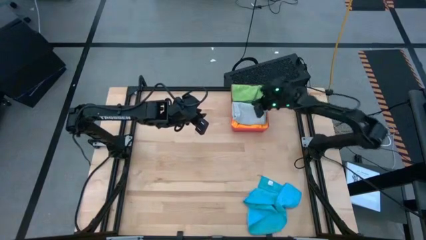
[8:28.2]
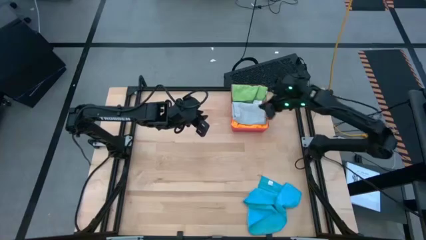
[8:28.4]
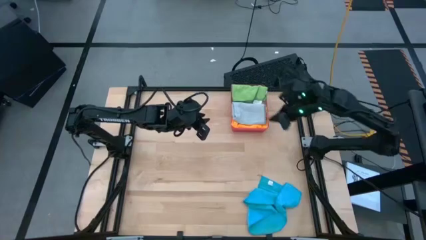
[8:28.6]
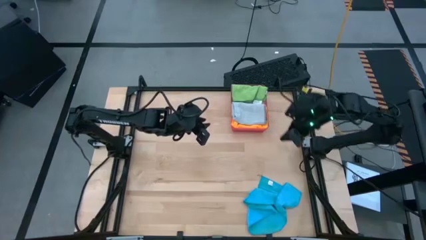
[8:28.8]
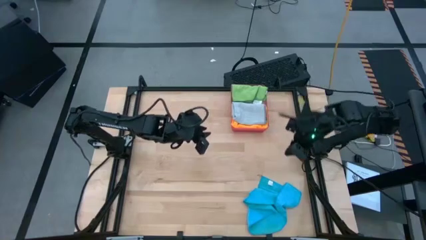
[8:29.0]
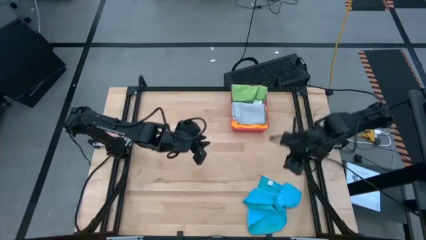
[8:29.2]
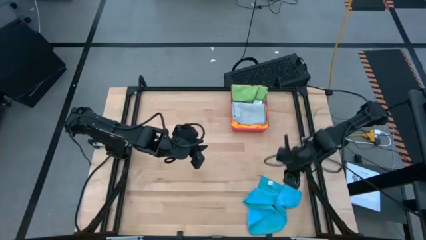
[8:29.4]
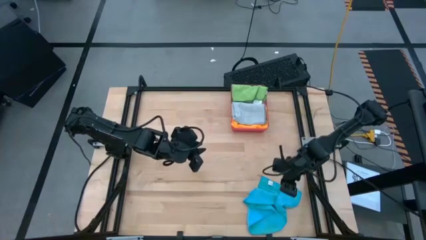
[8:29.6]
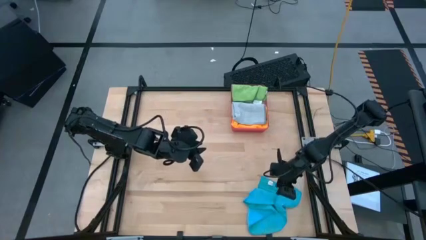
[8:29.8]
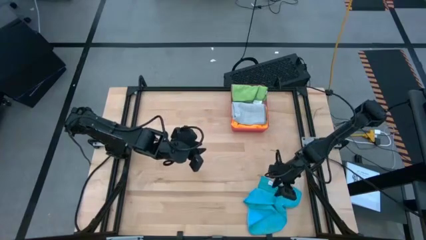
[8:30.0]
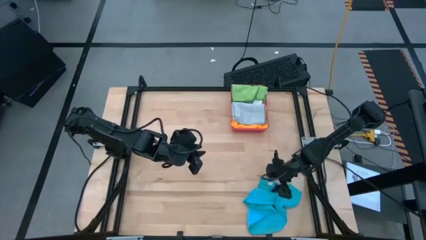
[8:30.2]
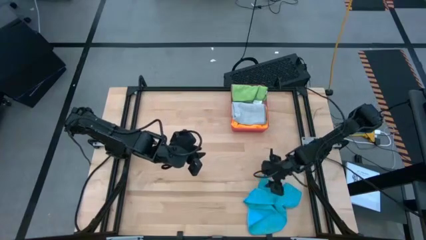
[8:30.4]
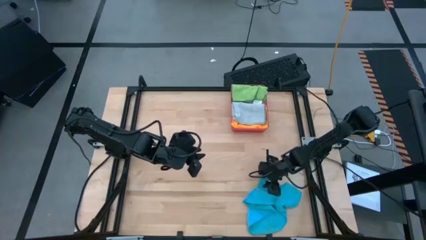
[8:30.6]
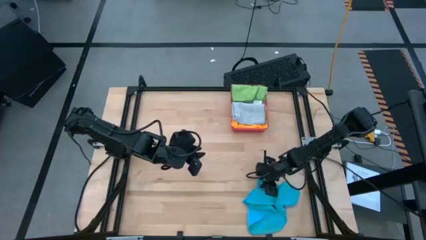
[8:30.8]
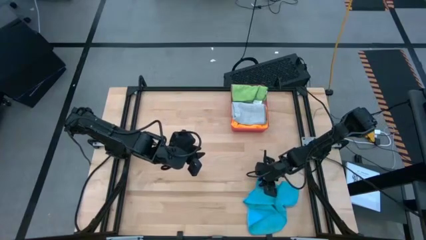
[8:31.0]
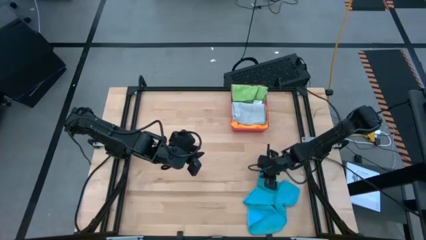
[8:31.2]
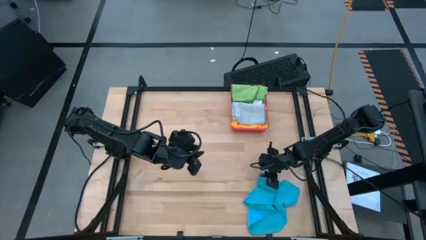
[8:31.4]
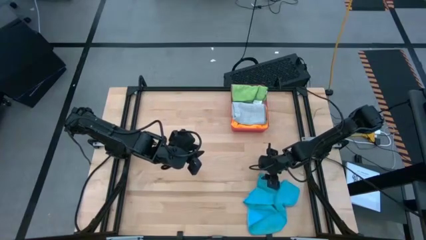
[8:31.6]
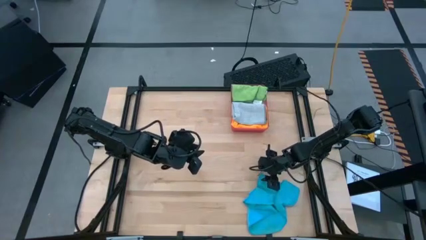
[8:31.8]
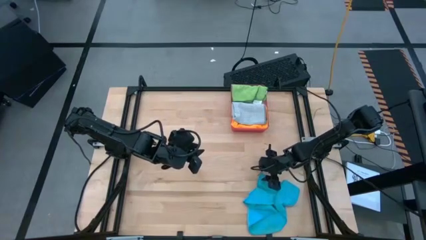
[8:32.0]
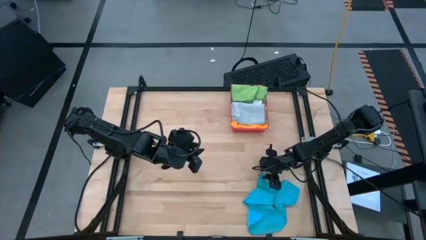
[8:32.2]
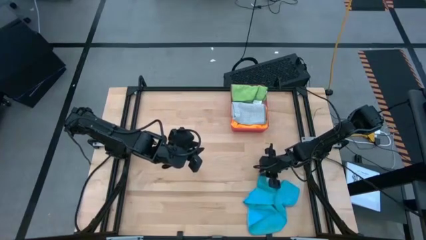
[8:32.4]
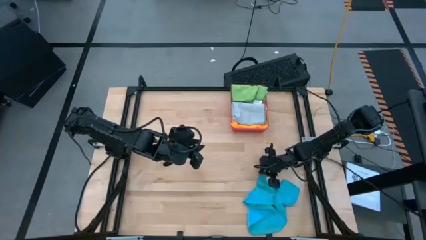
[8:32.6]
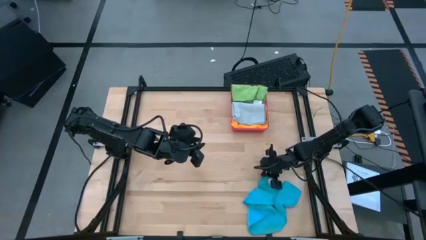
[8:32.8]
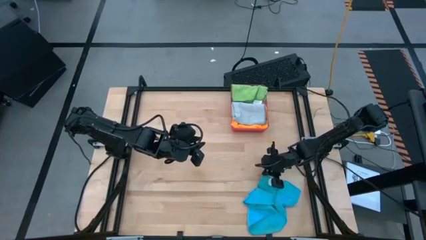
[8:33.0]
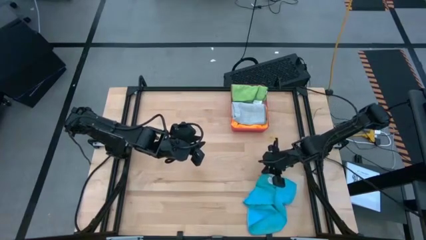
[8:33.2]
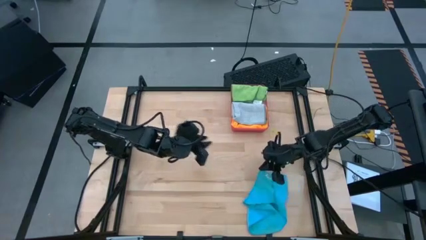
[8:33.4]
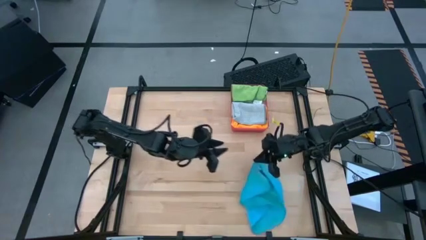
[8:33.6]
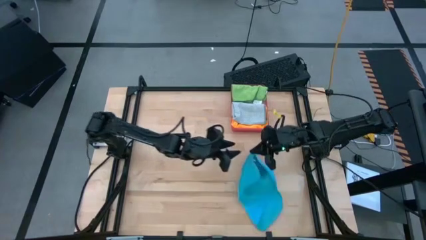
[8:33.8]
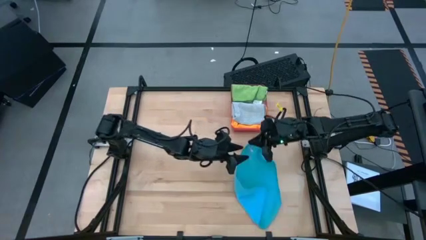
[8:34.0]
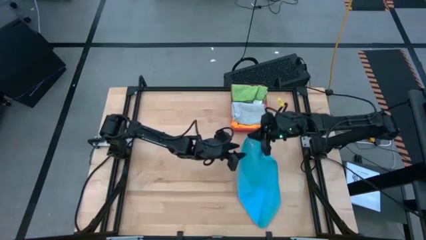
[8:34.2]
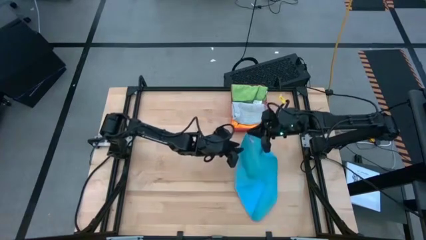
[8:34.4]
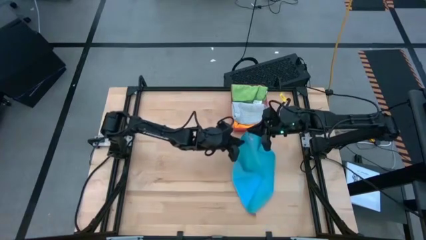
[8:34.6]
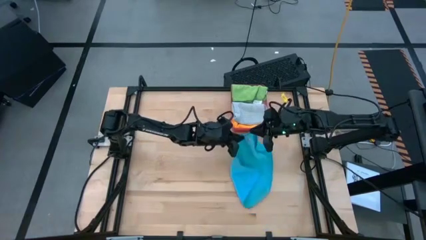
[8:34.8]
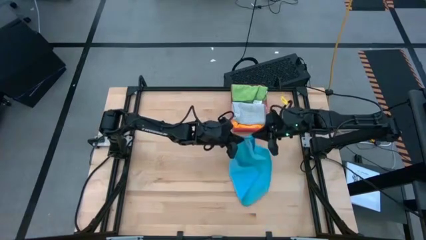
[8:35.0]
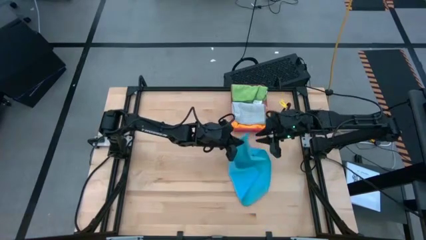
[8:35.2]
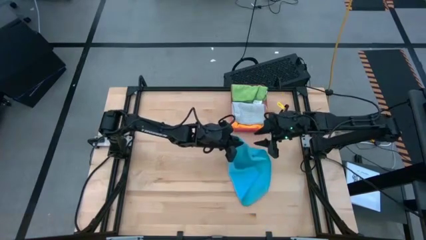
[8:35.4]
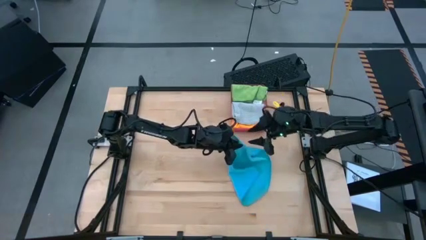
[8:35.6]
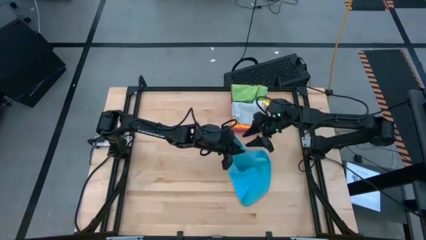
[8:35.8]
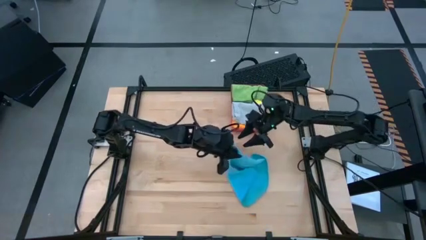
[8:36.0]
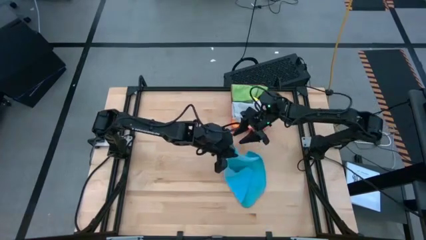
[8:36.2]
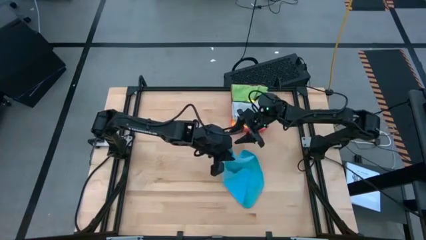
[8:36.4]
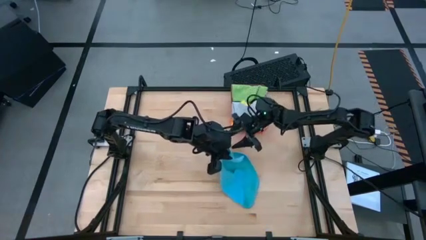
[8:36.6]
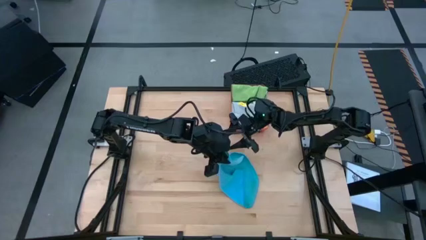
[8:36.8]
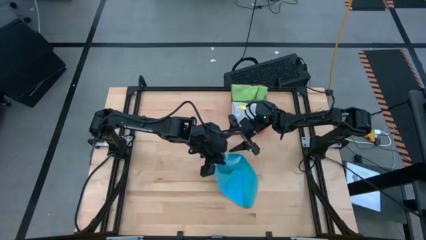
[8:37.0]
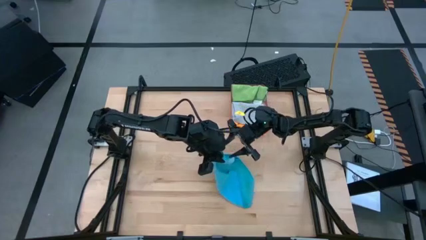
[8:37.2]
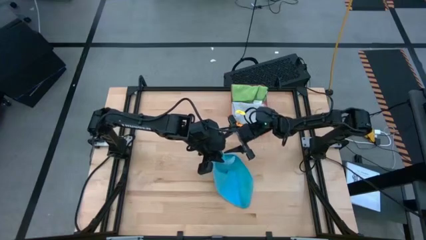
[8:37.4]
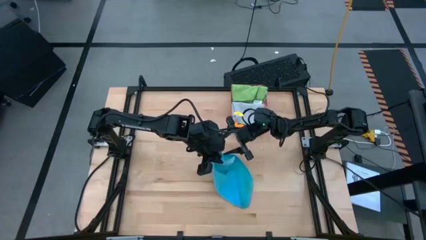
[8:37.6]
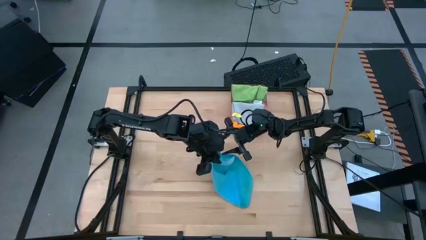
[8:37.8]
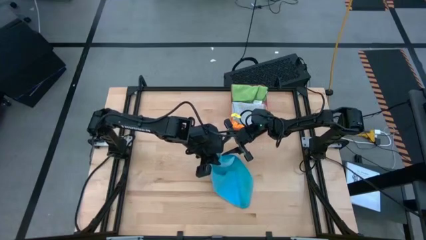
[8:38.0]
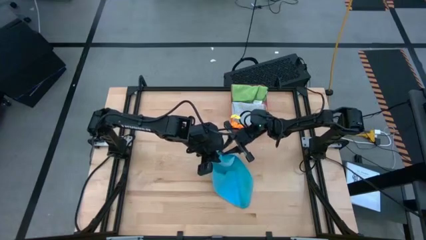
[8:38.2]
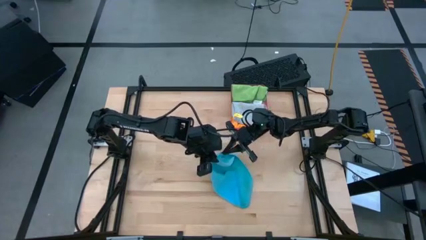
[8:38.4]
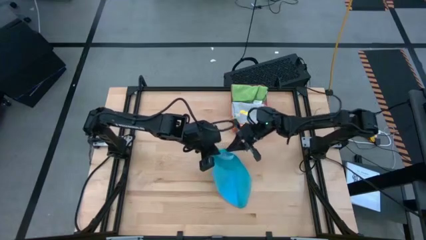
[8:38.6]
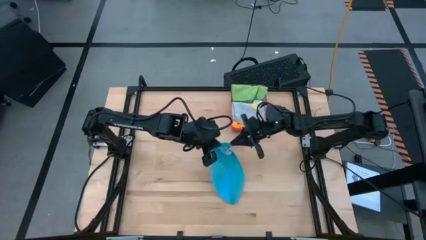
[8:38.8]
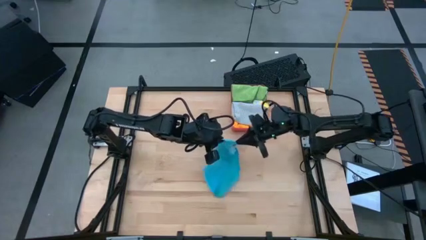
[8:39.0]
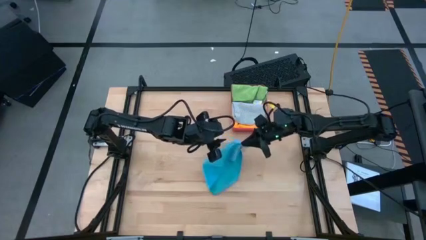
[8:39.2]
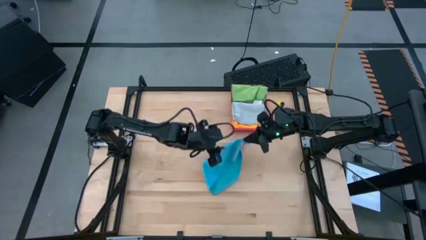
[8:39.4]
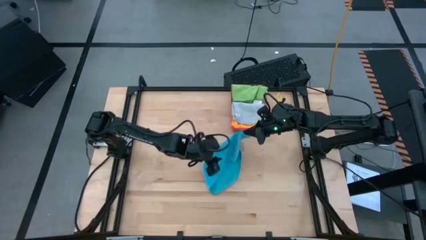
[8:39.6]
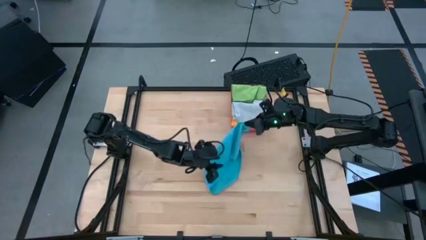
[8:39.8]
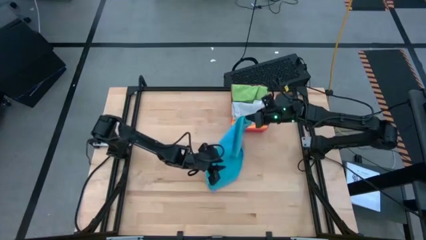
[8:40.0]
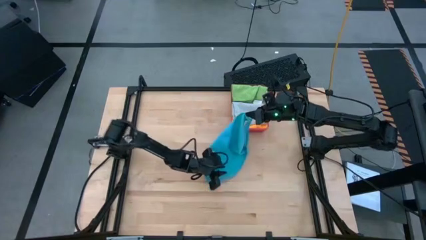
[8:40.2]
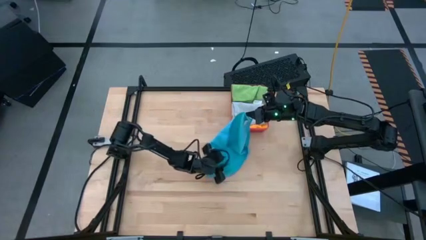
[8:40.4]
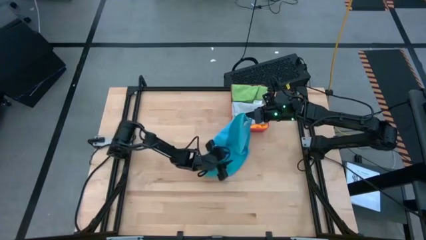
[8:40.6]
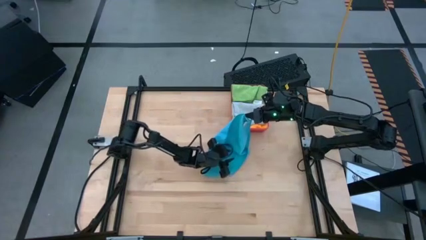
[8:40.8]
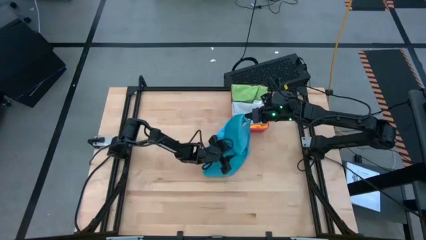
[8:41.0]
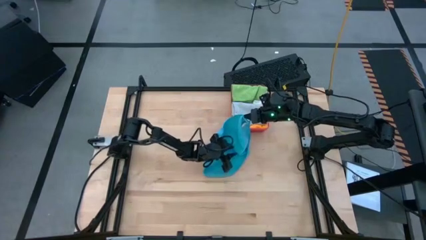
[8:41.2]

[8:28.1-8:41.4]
Task: Fold microfiber towels
Fold the blue microfiber cloth

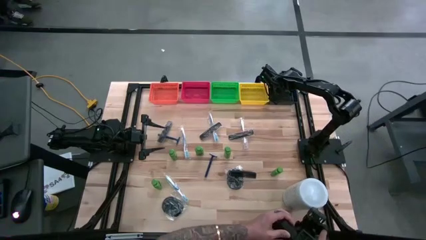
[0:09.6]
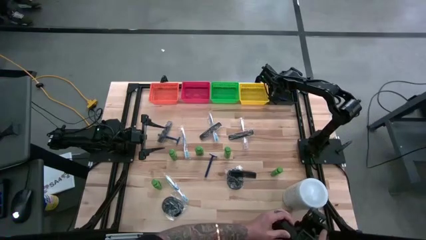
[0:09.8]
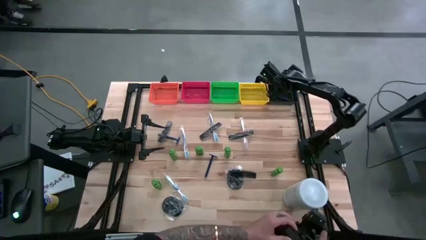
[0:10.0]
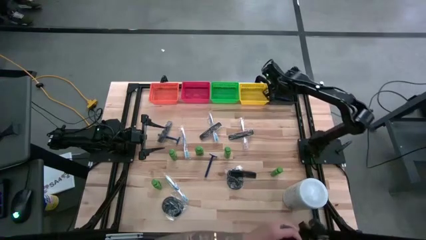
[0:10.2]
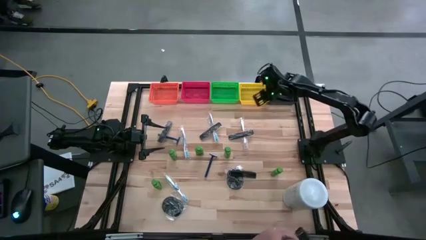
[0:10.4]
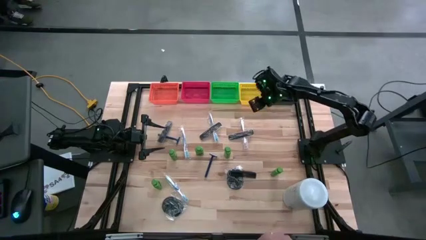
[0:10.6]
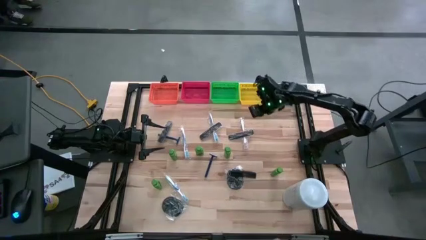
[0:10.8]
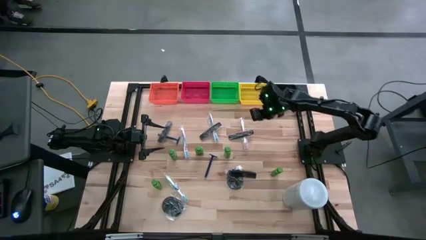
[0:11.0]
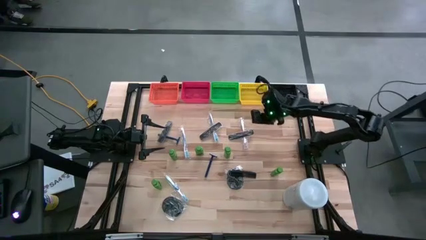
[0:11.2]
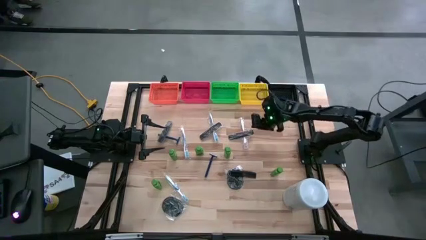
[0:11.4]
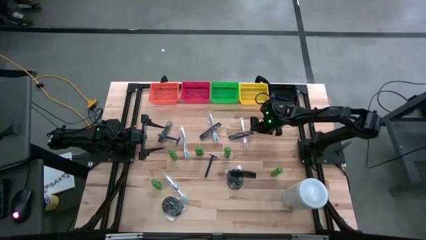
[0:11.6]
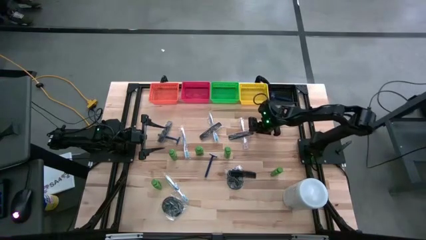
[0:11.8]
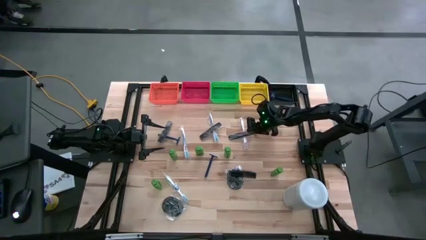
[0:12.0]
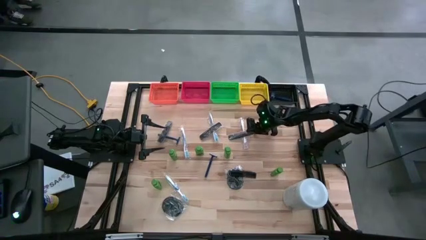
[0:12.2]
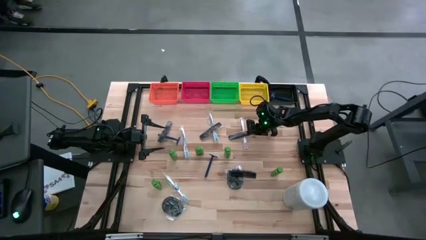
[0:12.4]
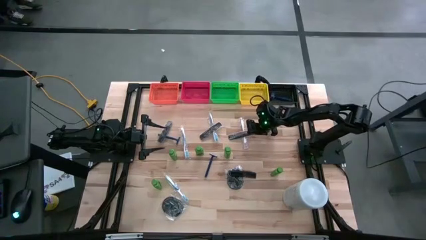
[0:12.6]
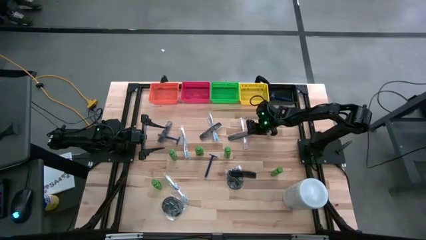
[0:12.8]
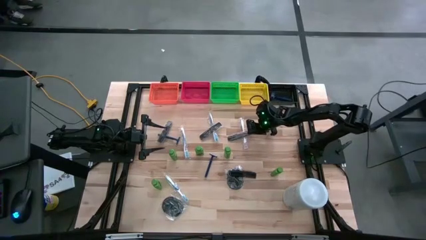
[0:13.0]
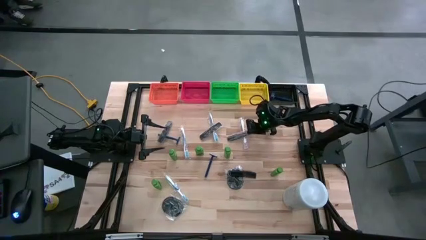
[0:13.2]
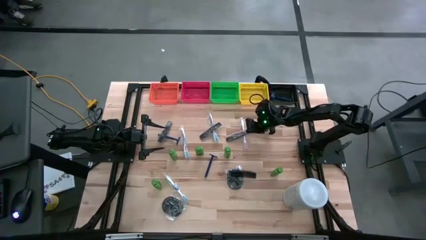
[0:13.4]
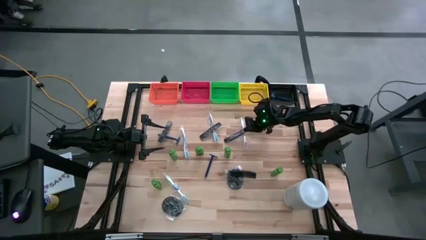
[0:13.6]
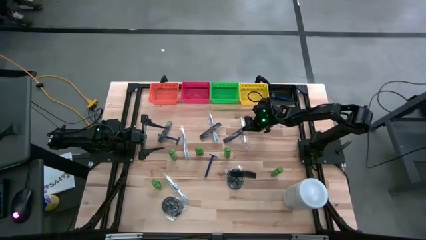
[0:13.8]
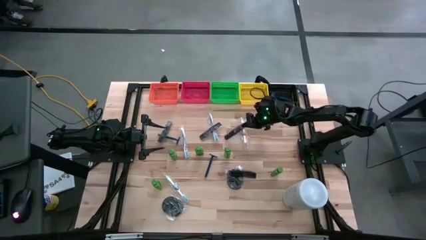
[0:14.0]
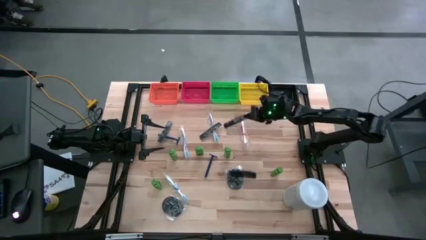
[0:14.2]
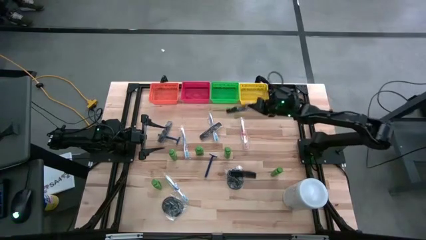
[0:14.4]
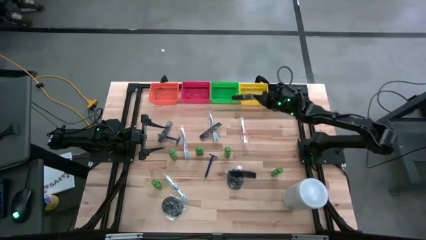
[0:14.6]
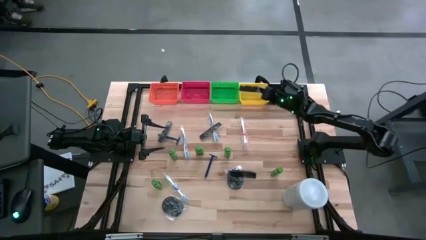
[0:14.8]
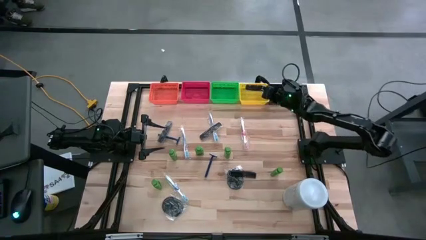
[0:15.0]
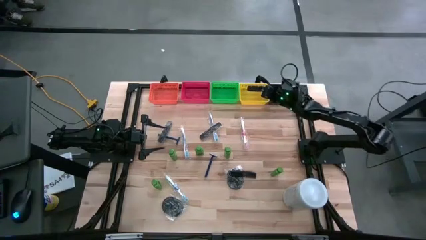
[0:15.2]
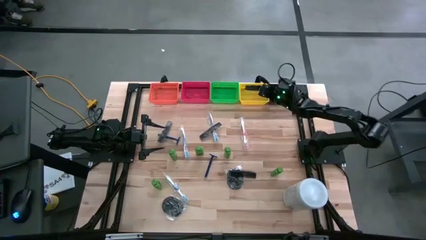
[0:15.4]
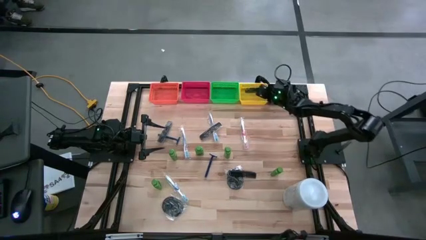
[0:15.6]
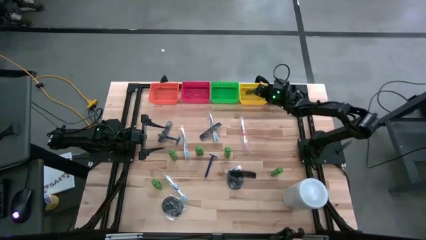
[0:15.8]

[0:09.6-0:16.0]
Task: Pick & Place Travel size toiletries
Put the black hair comb into the yellow bin
